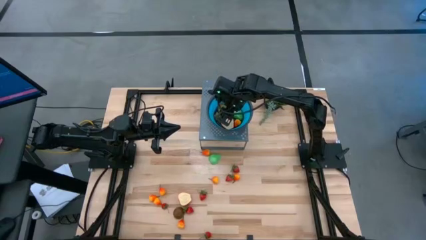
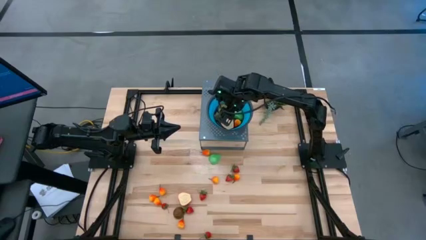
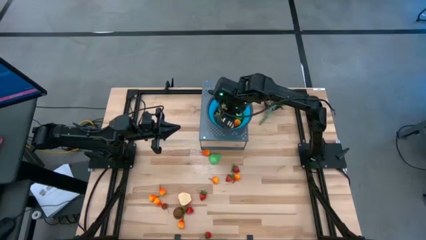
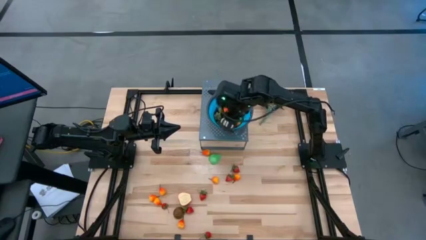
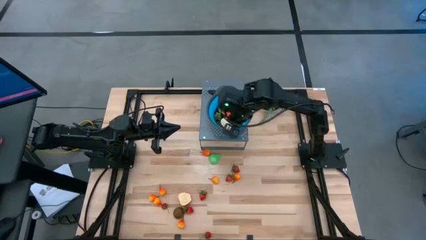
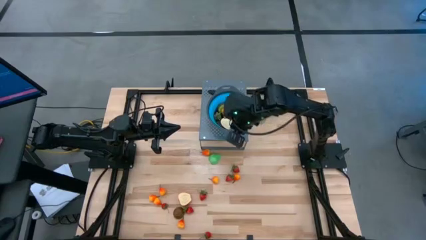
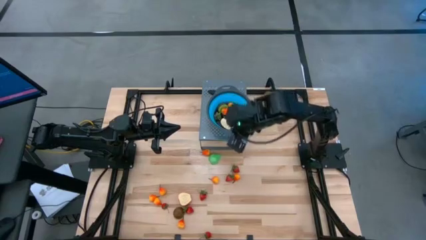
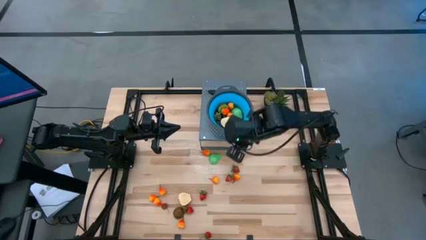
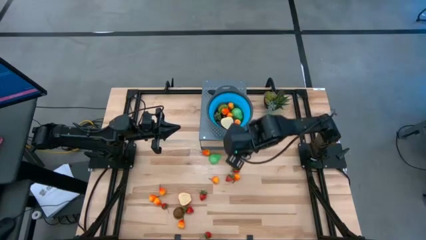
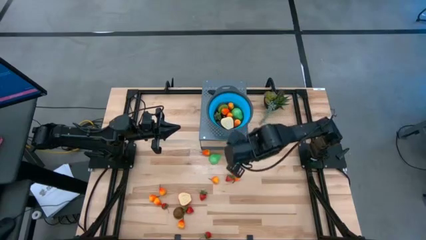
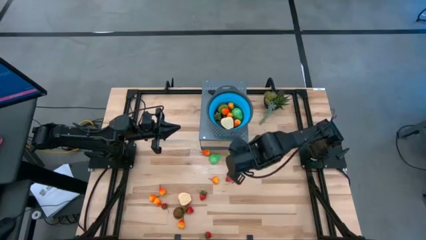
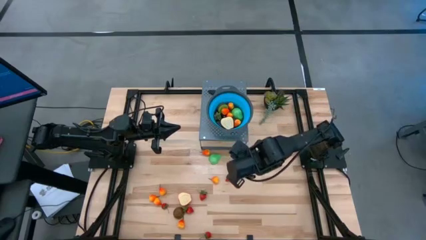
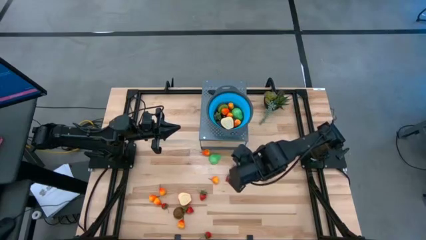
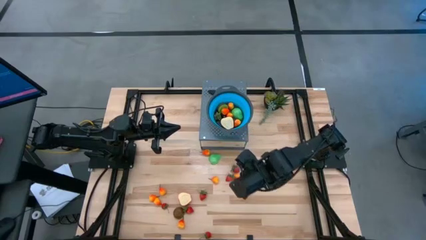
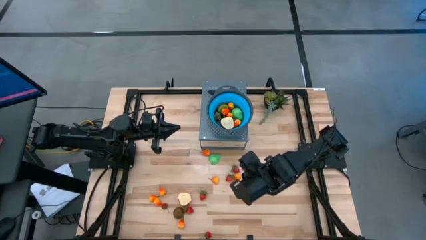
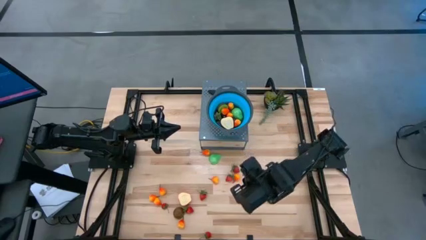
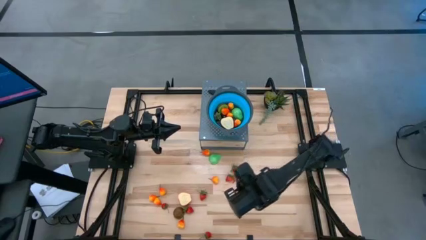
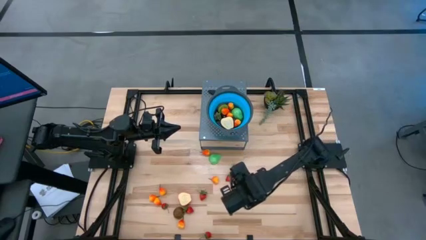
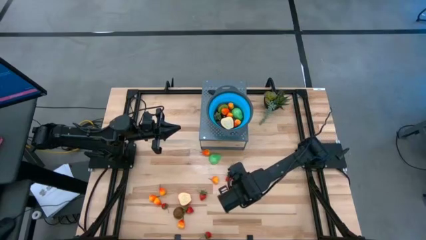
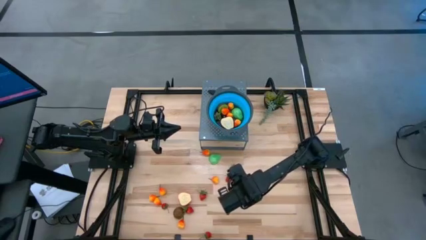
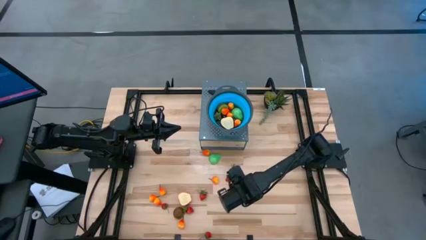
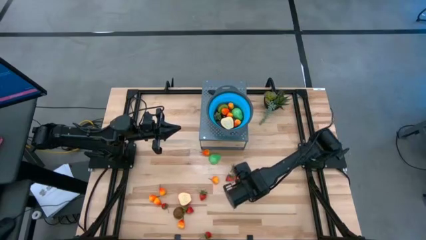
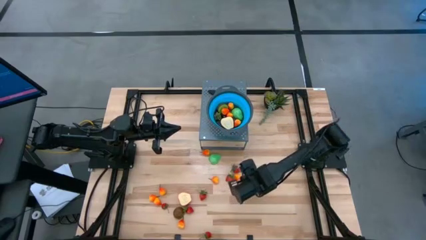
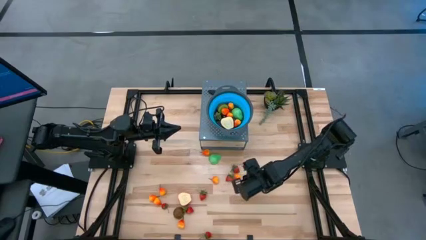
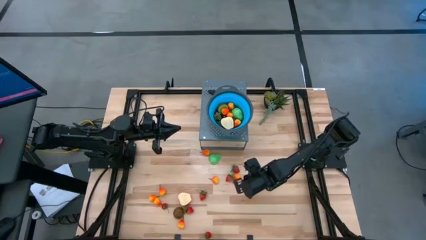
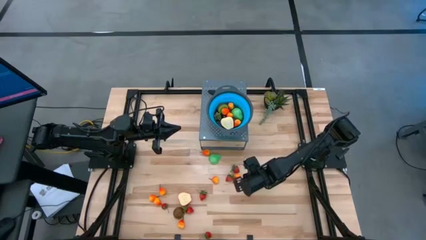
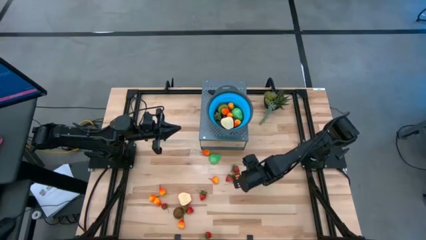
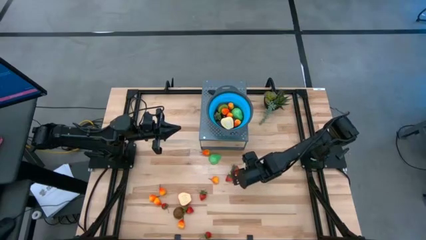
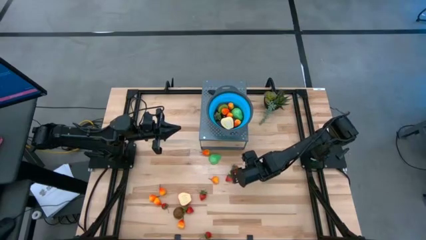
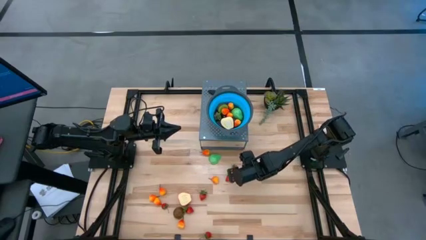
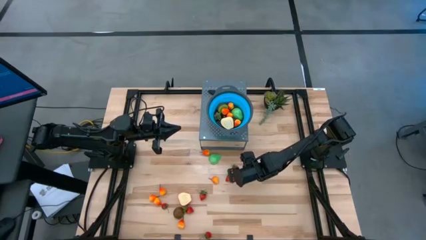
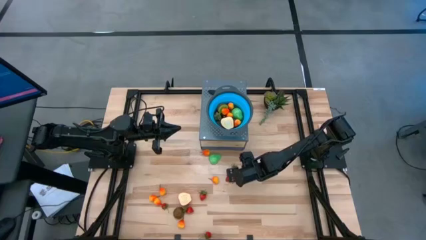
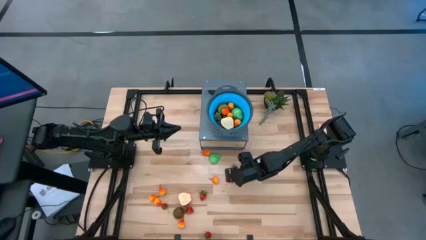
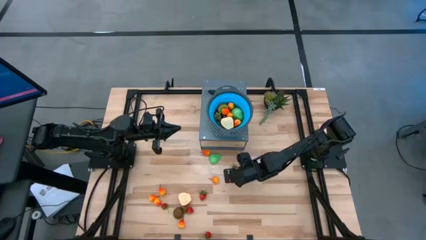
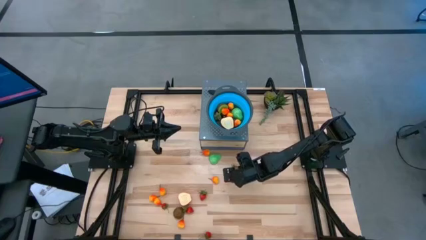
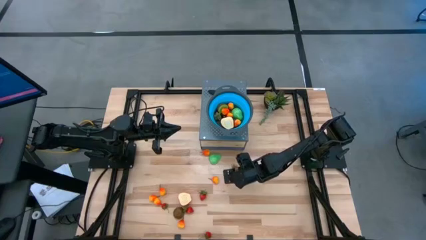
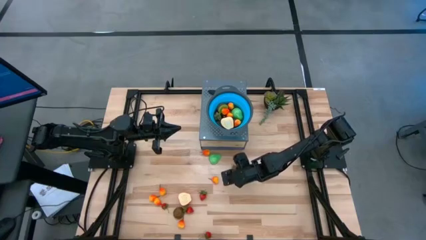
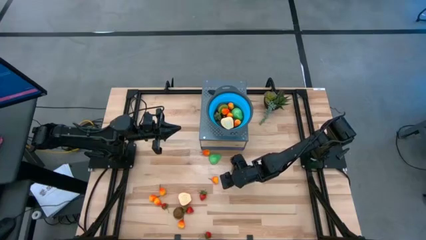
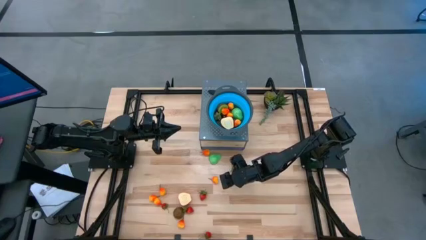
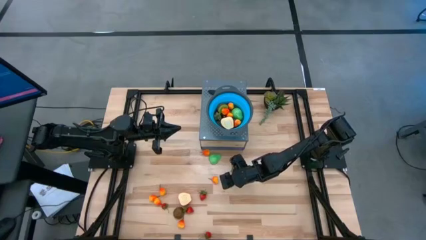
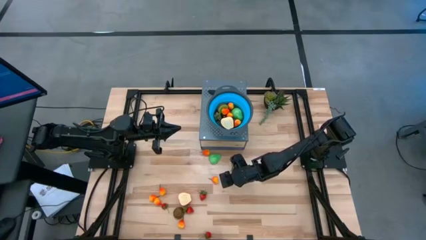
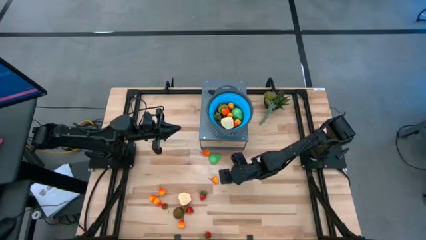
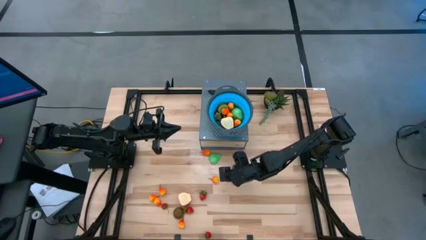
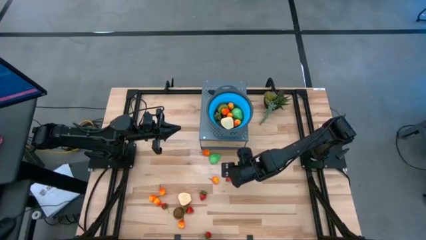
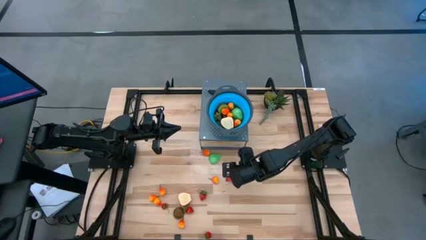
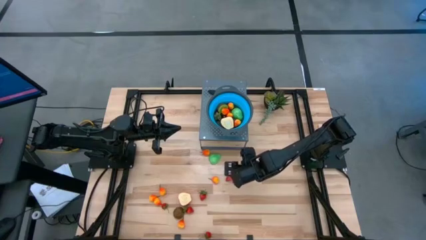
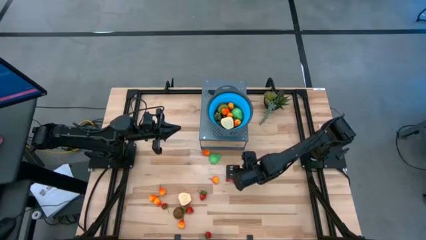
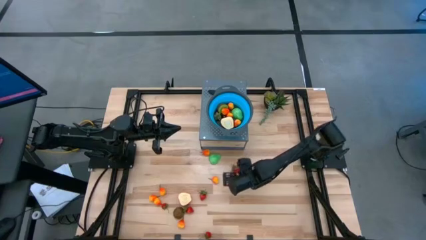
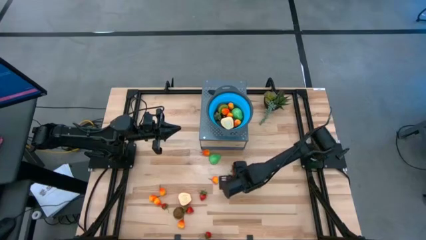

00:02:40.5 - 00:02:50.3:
Task: Pick & Place Fruit
Put the peach into the strainer bowl

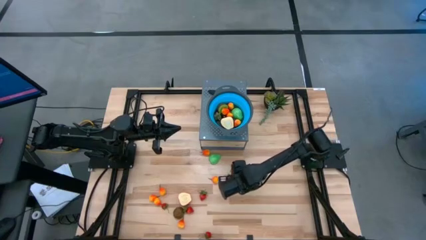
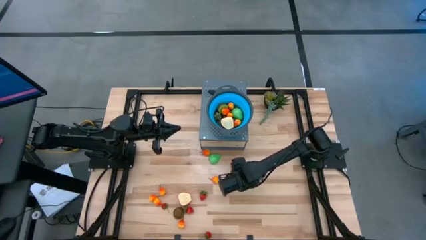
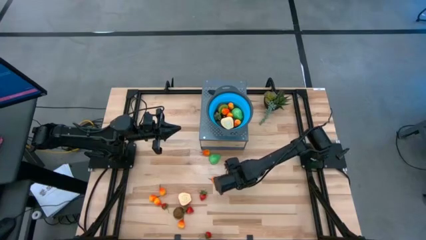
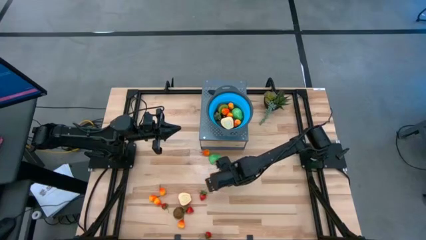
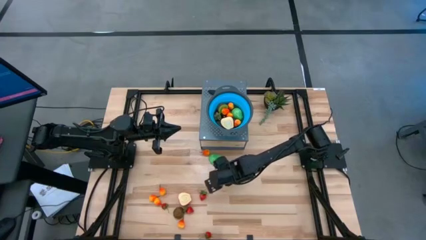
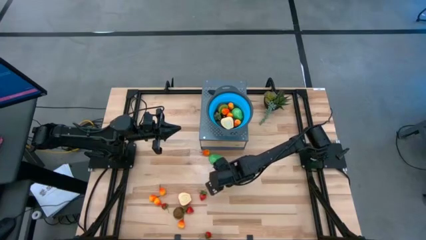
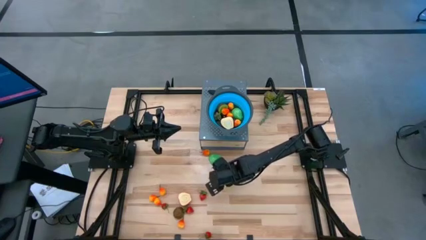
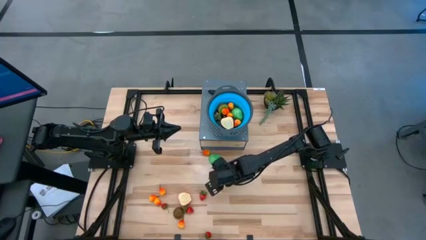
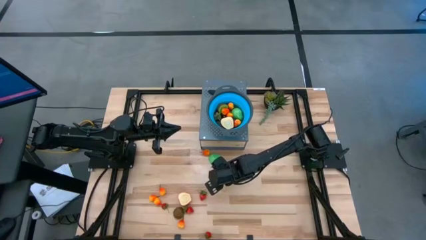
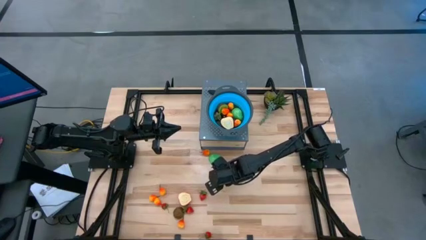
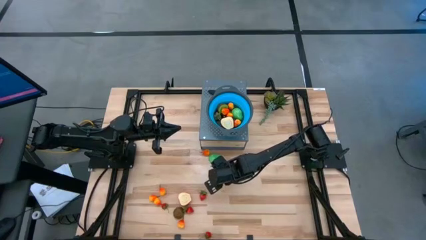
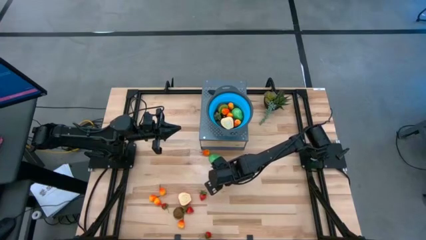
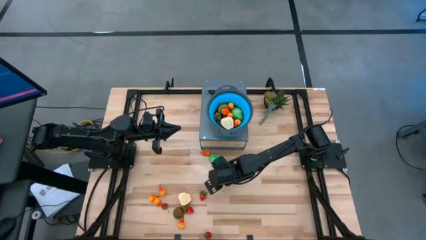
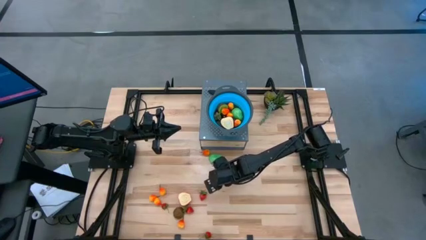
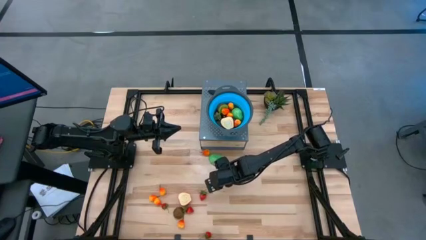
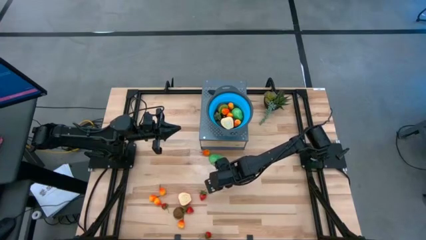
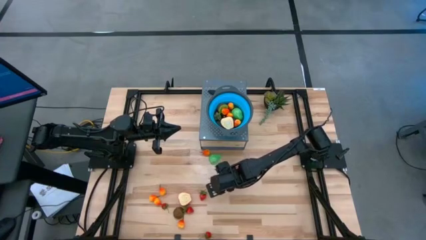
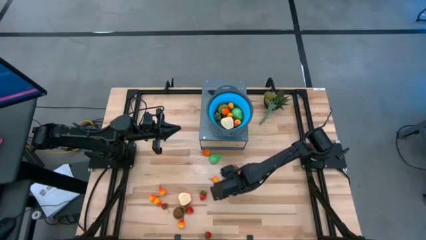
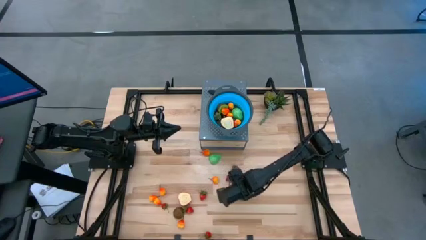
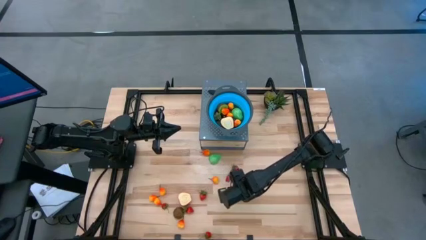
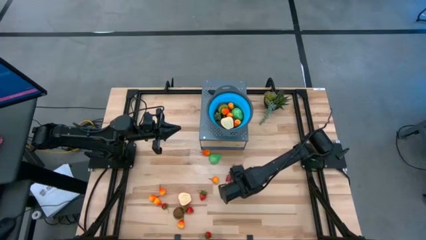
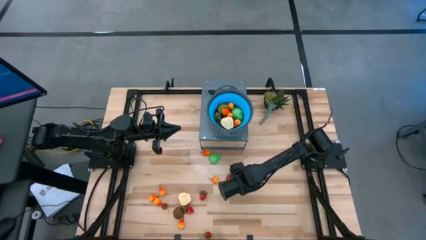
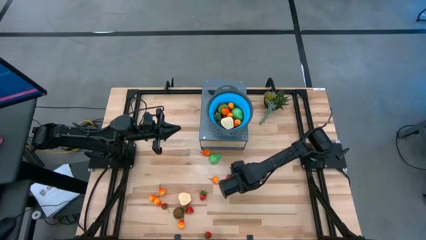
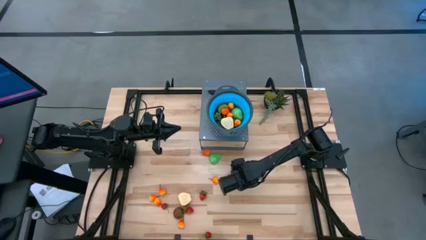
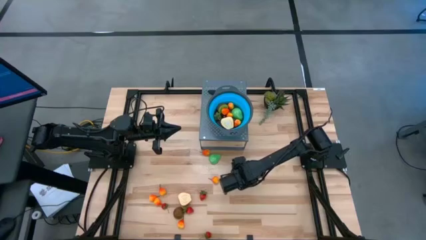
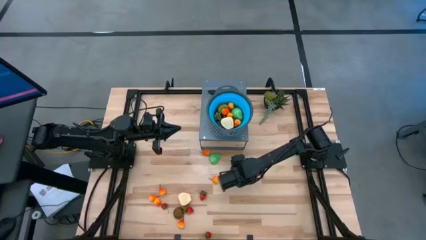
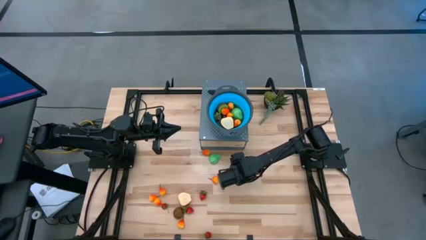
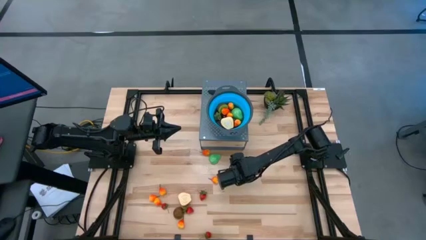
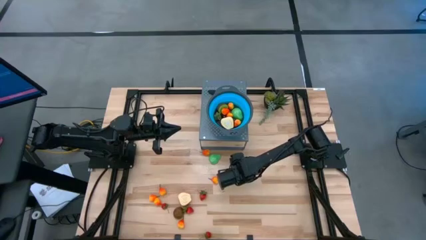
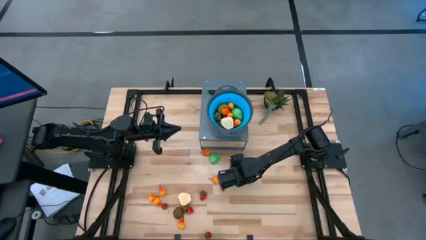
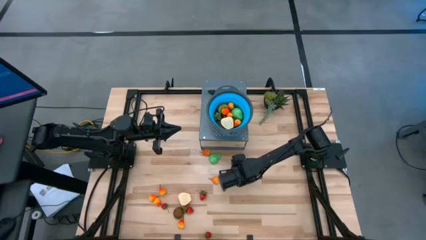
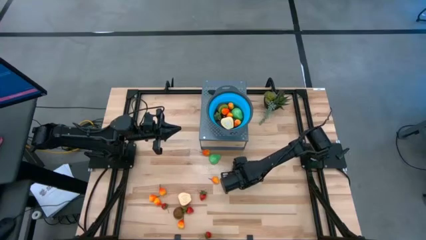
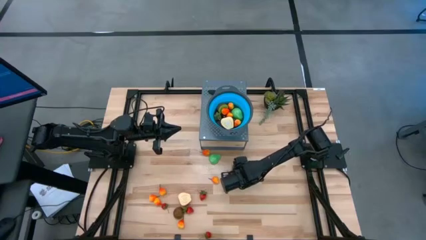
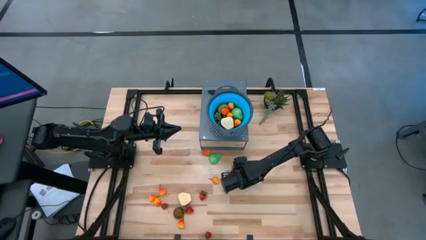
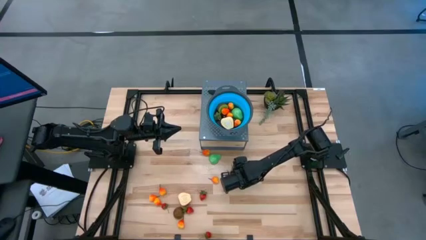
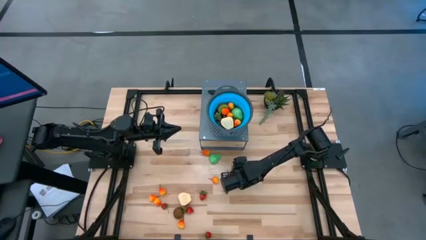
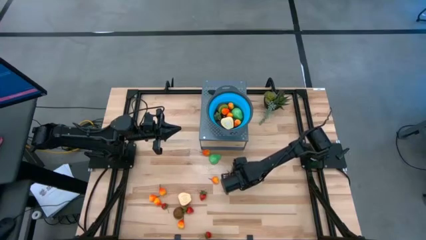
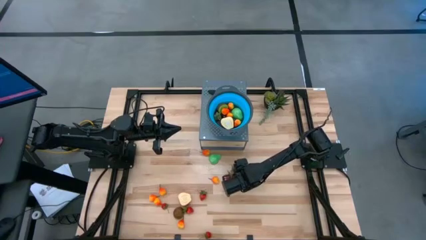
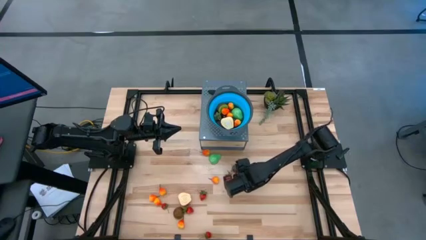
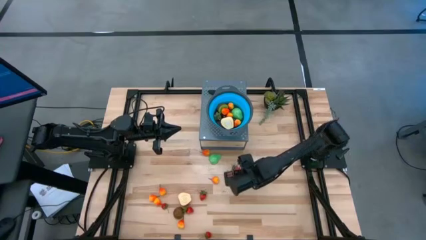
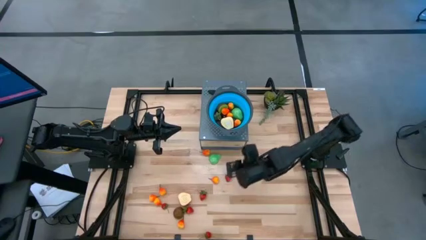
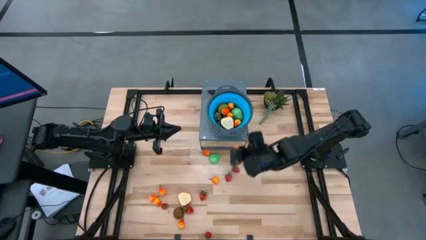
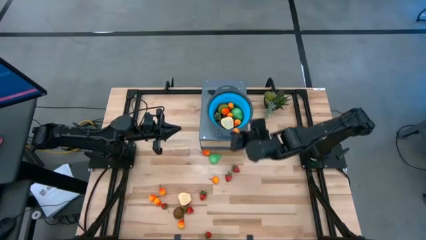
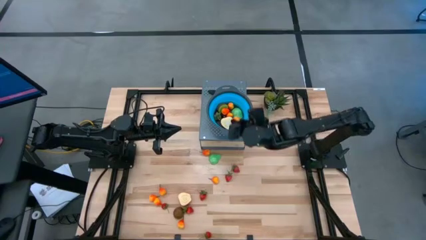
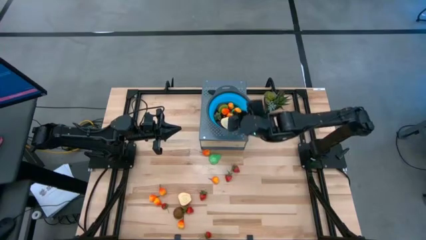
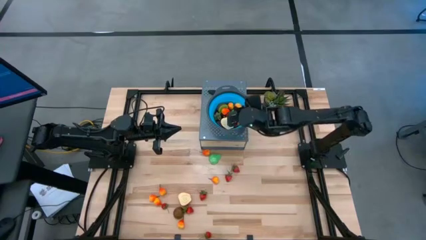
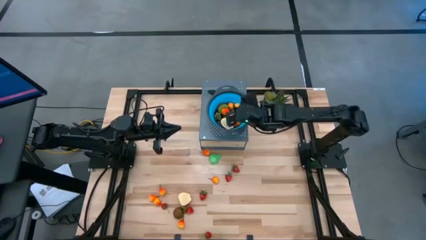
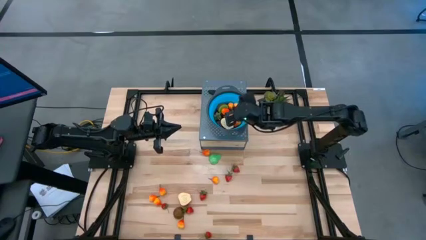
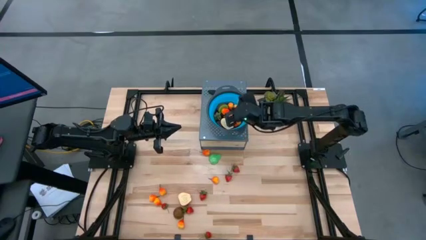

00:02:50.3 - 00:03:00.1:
Put the peach into the strainer bowl
